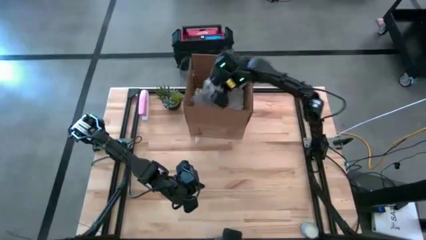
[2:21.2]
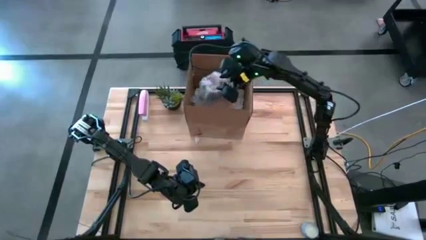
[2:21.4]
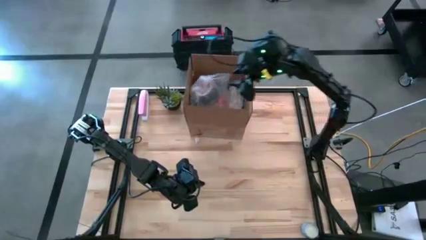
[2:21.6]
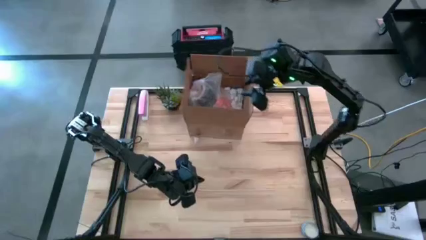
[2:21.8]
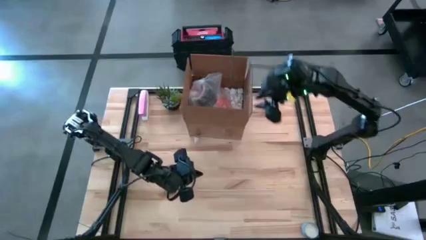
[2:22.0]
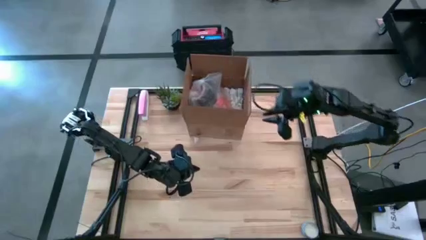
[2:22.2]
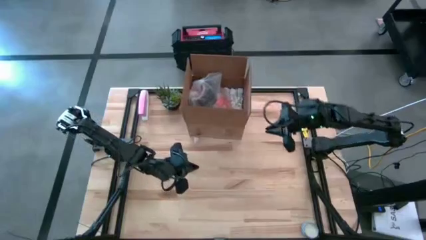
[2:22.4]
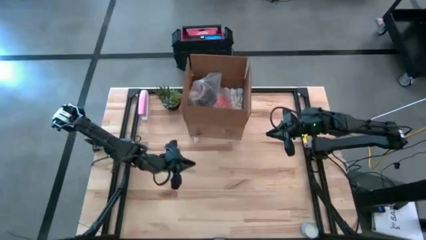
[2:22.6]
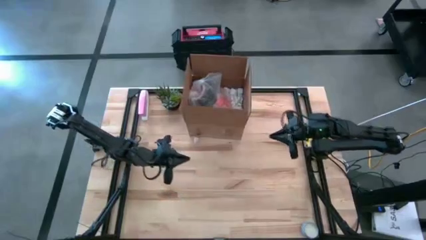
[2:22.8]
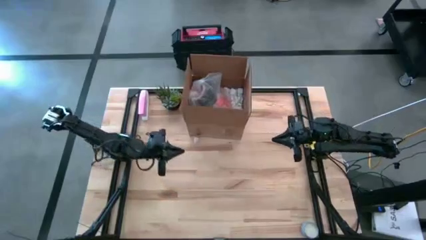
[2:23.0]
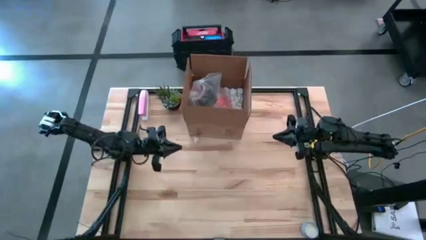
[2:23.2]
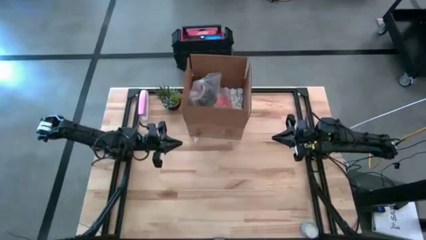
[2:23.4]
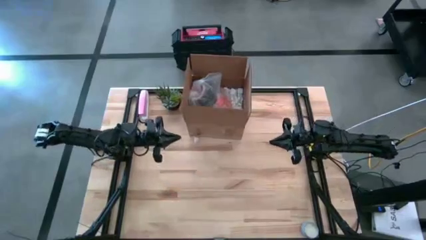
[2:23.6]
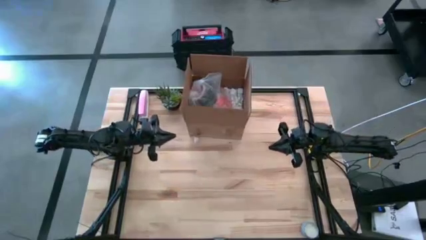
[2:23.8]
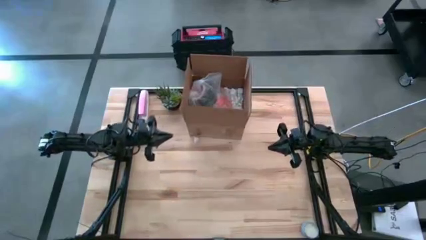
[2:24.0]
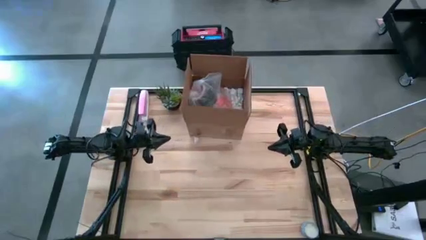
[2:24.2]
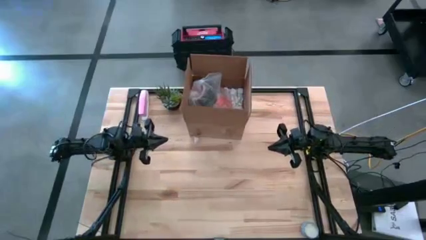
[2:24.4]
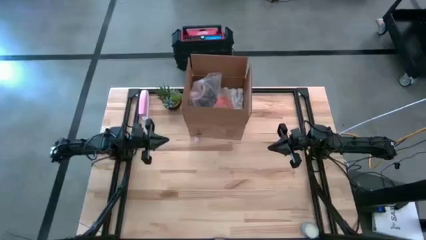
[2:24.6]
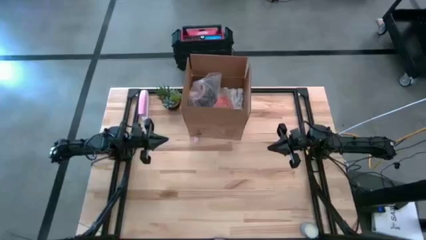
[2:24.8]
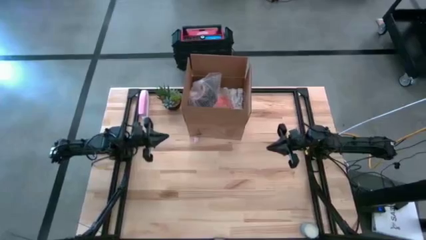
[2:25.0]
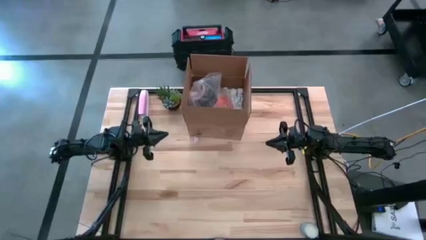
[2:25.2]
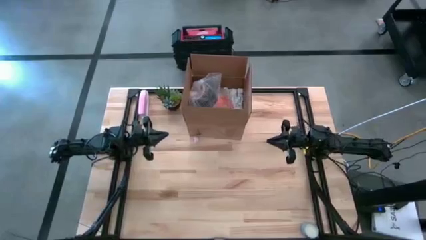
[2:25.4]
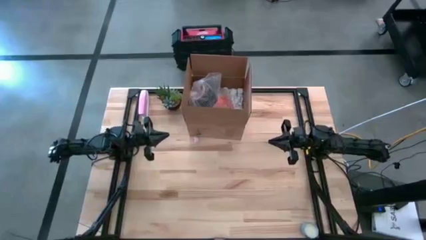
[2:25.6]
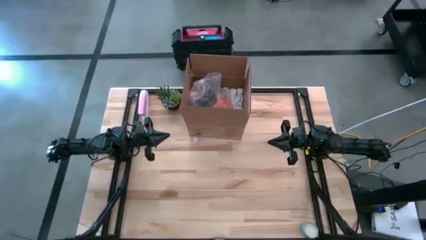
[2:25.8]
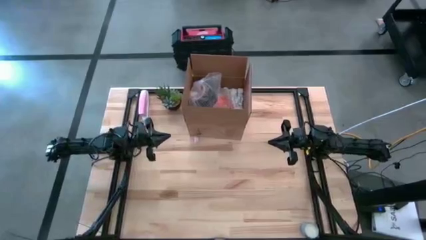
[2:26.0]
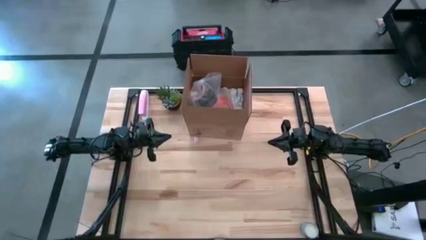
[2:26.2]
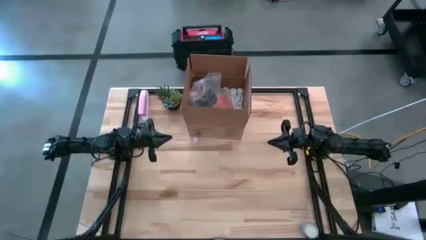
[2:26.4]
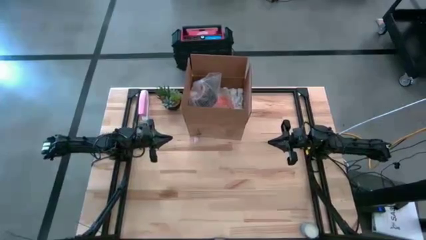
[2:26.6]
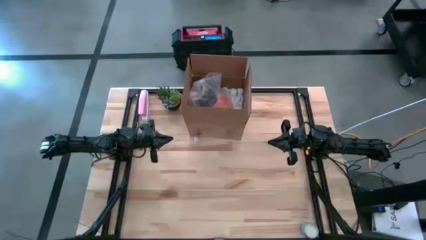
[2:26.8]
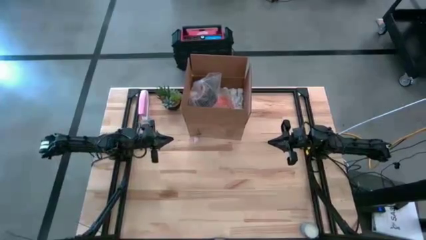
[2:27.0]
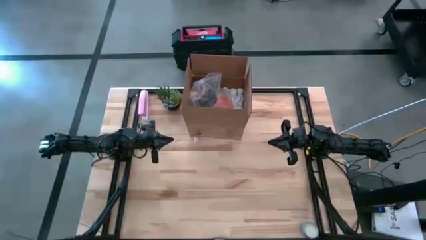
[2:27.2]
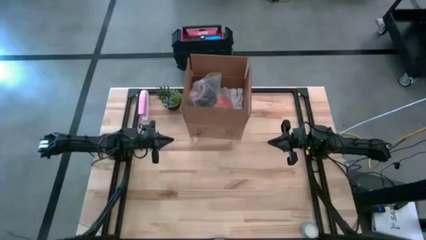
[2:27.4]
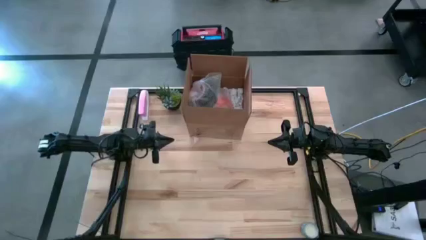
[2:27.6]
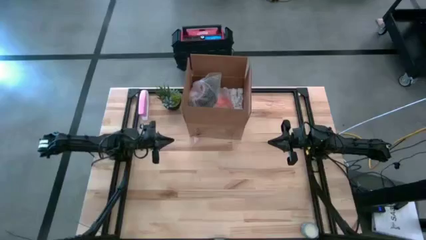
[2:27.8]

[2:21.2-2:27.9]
Task: wrap mug
Return to Home Position

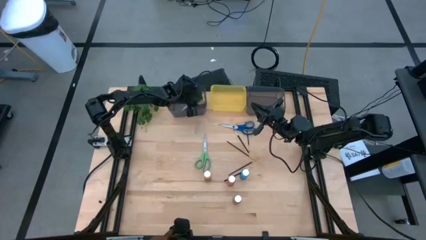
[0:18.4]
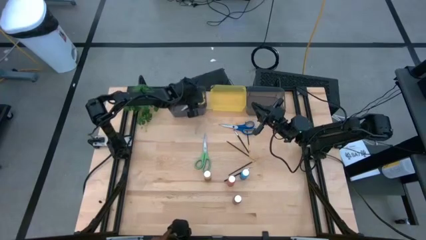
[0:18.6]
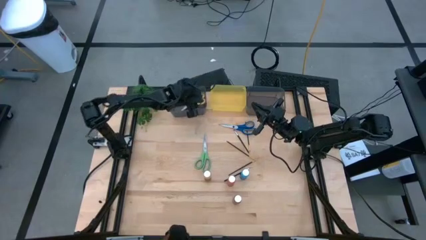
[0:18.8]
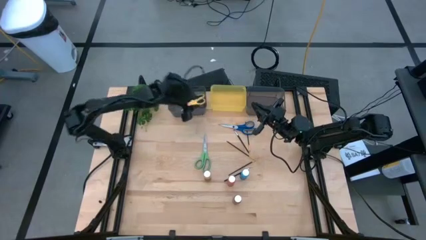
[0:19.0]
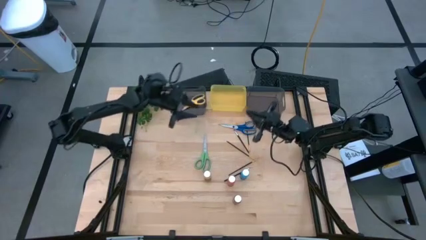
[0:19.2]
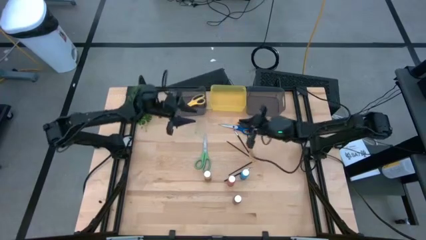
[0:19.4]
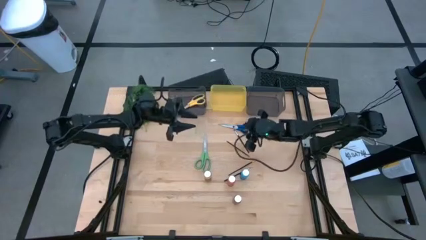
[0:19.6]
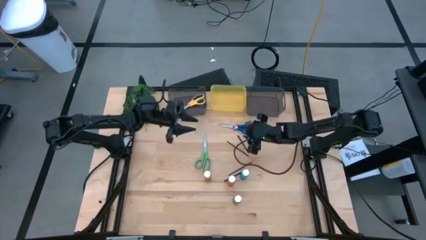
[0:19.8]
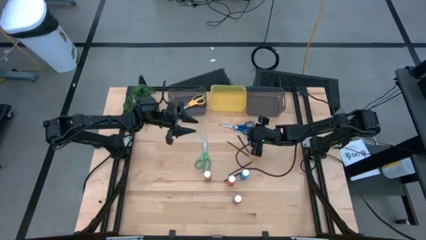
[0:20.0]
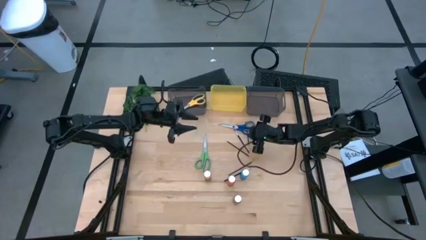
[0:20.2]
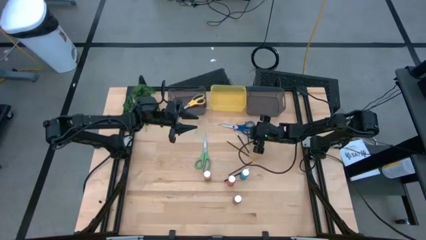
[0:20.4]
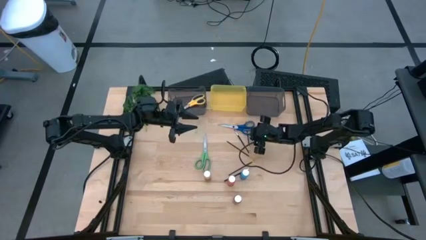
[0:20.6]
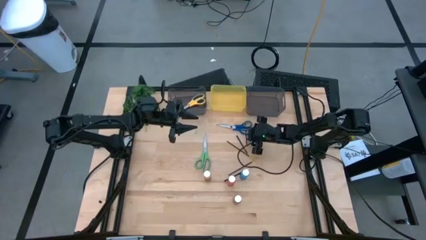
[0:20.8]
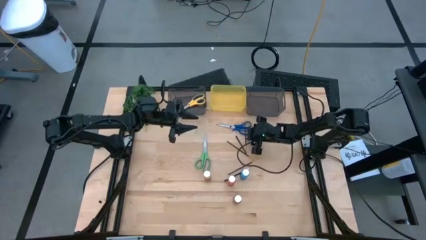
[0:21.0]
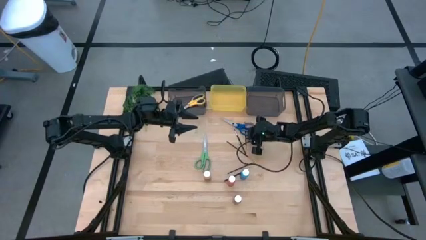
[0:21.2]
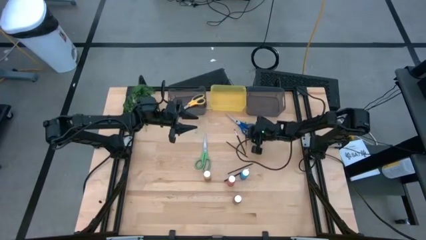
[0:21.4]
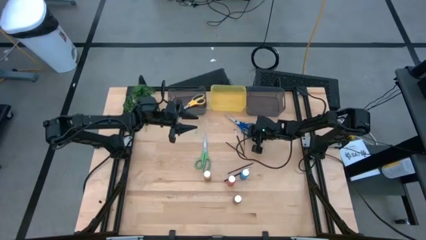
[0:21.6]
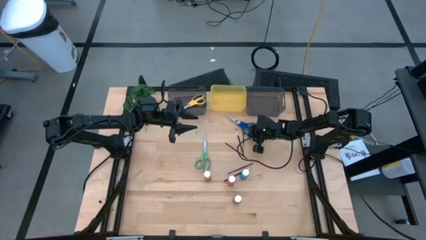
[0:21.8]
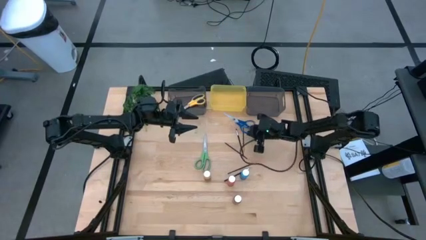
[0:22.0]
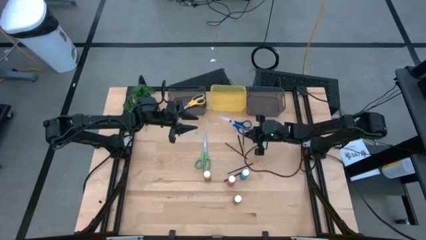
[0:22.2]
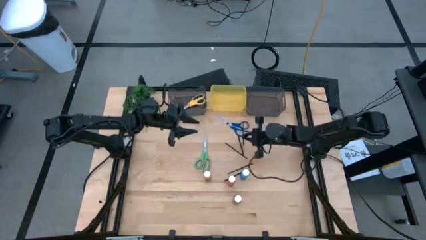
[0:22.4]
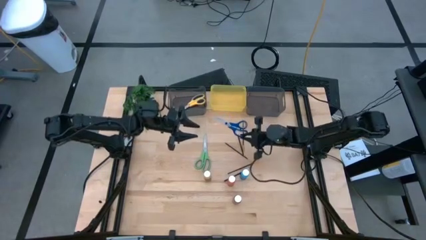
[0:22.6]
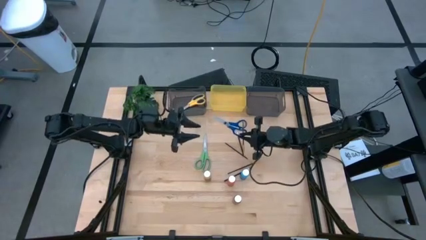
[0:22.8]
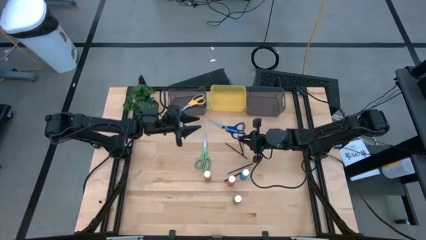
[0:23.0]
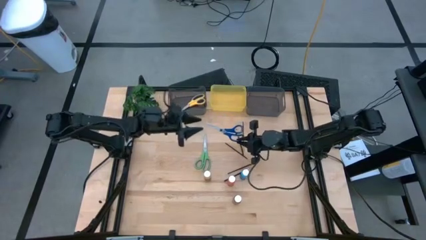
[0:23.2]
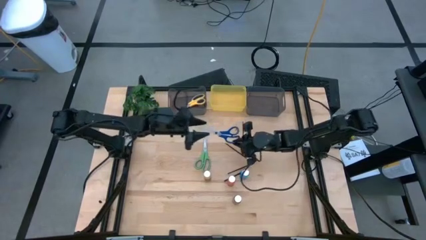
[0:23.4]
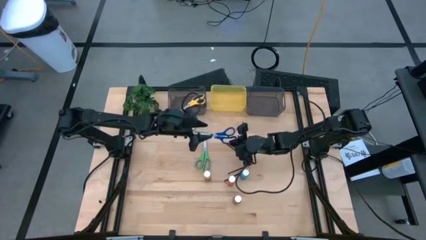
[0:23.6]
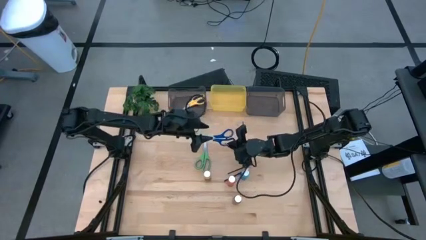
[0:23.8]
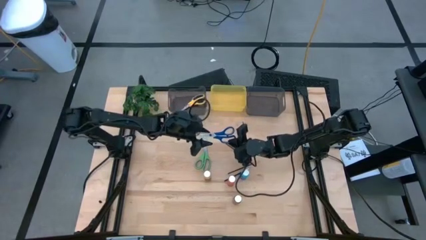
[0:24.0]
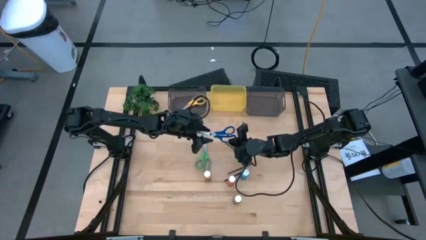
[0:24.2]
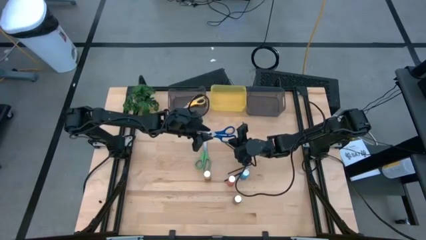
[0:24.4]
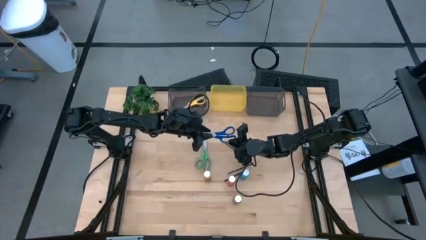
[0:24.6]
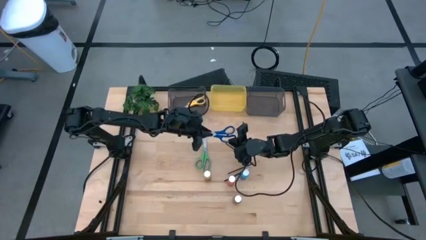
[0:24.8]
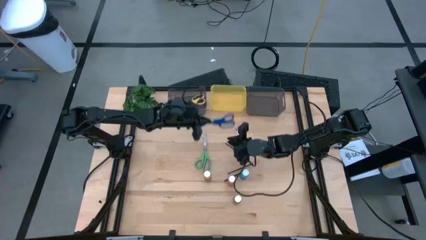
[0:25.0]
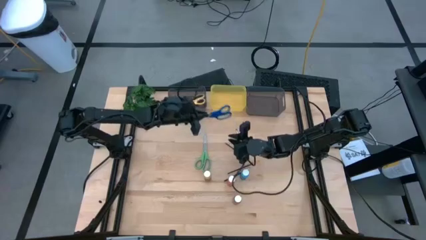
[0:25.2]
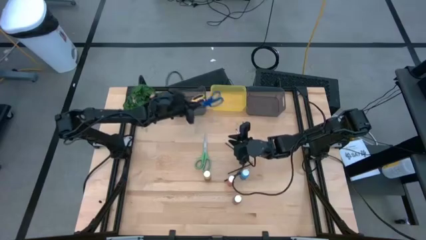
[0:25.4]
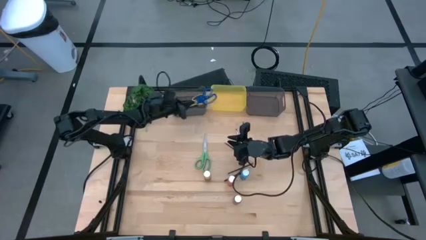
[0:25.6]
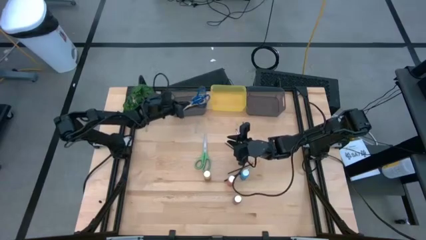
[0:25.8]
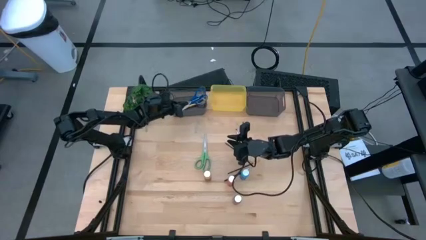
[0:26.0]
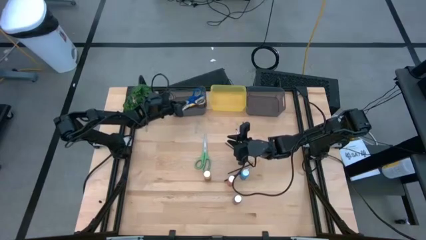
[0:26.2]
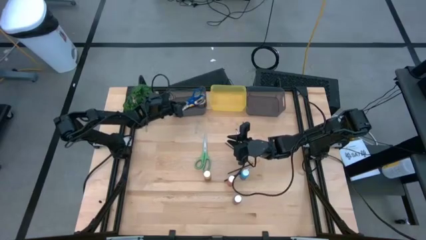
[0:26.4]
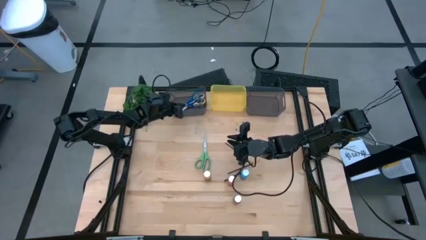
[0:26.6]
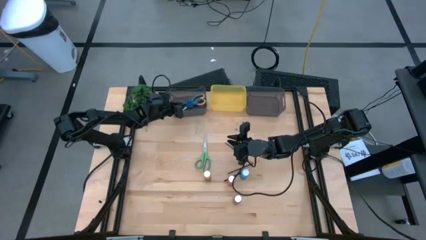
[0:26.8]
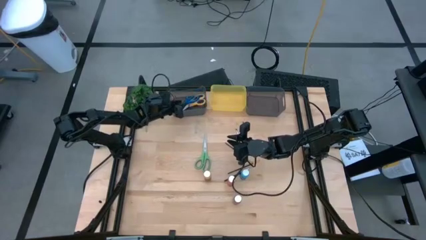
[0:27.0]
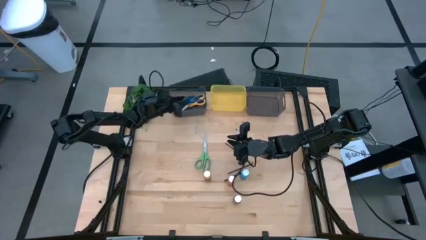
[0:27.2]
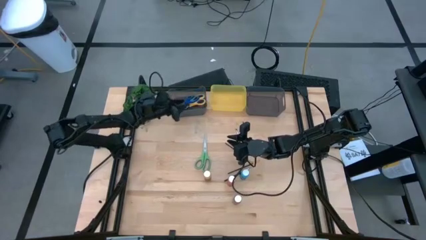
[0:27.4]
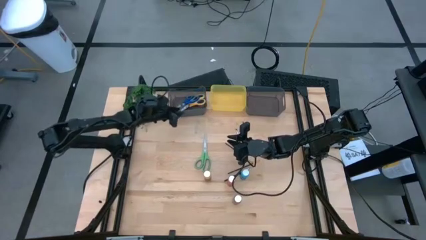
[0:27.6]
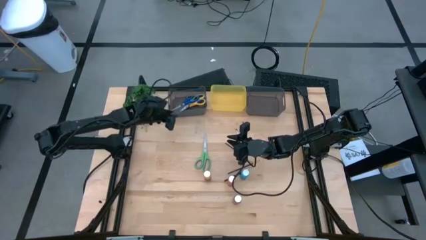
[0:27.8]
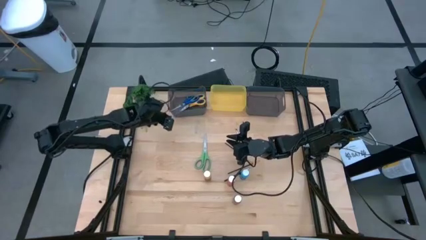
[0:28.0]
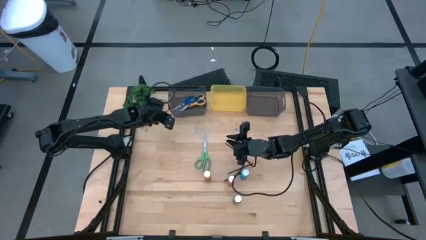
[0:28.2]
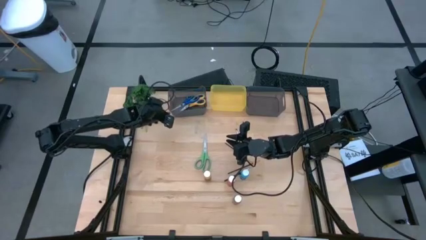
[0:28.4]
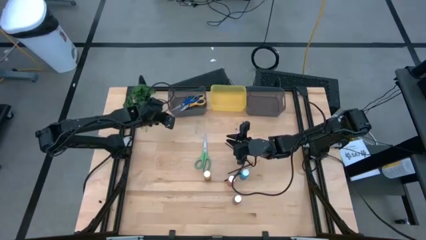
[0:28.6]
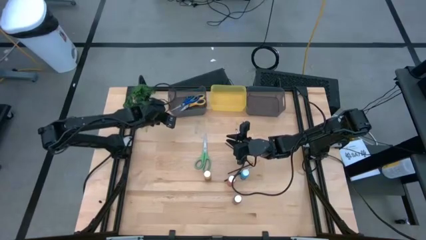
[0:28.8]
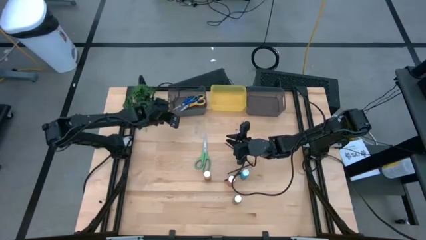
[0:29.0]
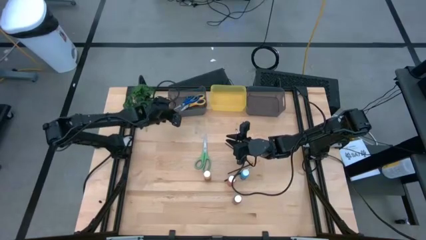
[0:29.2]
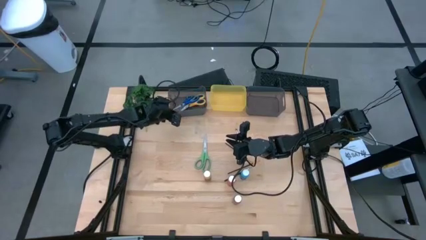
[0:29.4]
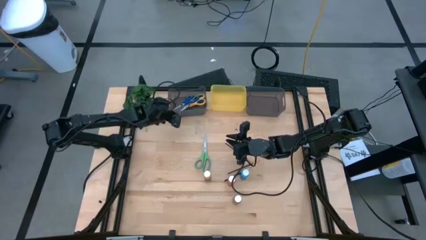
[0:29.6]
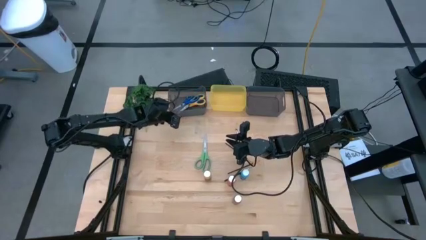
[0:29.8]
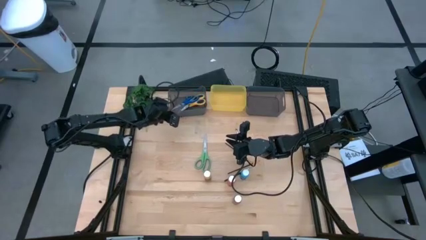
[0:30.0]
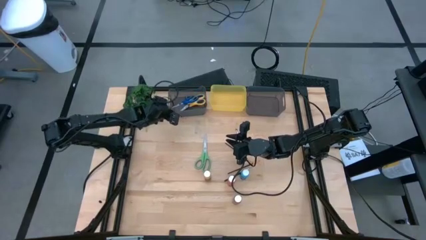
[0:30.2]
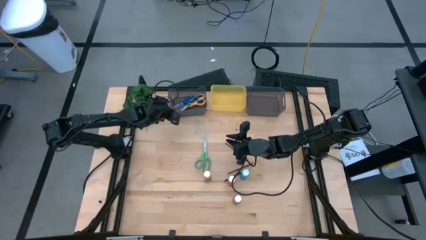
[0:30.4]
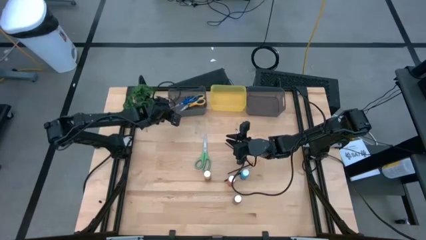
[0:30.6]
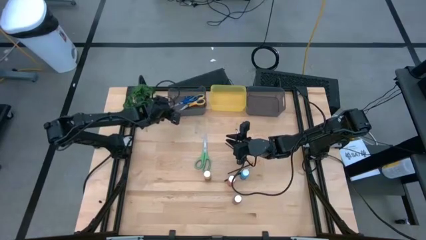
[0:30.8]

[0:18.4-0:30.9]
Task: Pick & Place Paint Supplies
Put the blue scissors into the left black bin
